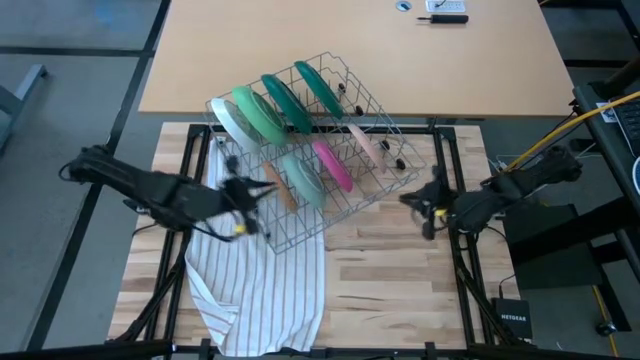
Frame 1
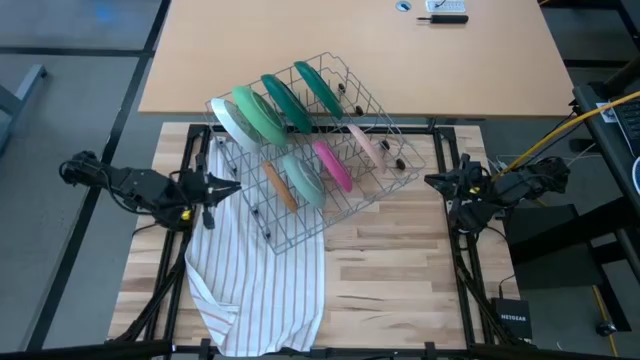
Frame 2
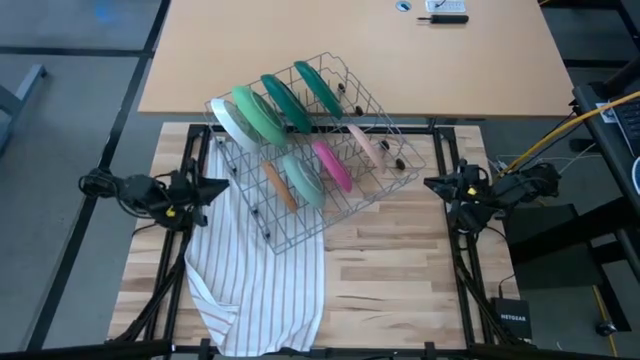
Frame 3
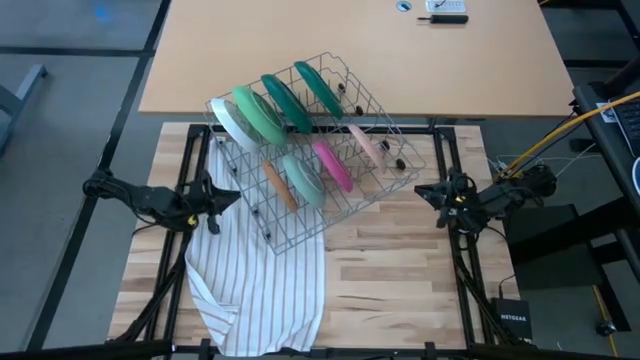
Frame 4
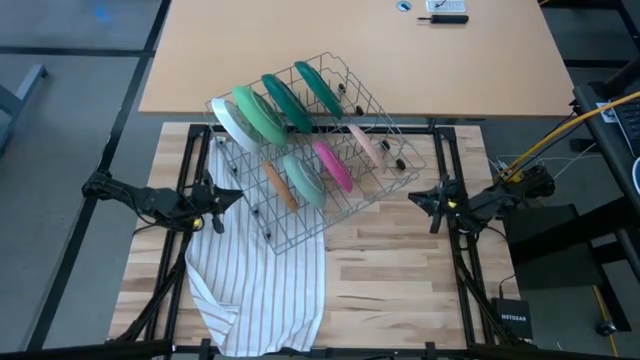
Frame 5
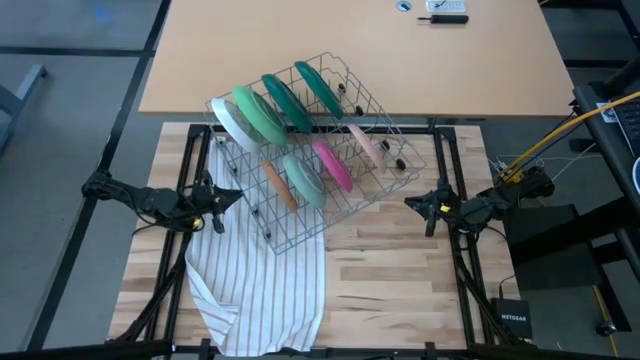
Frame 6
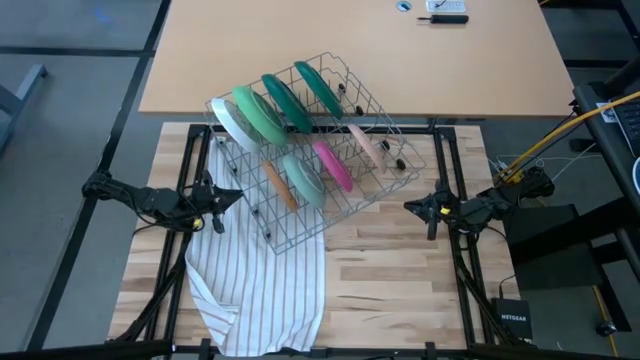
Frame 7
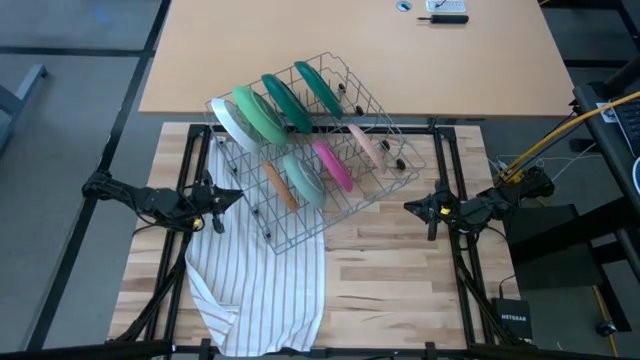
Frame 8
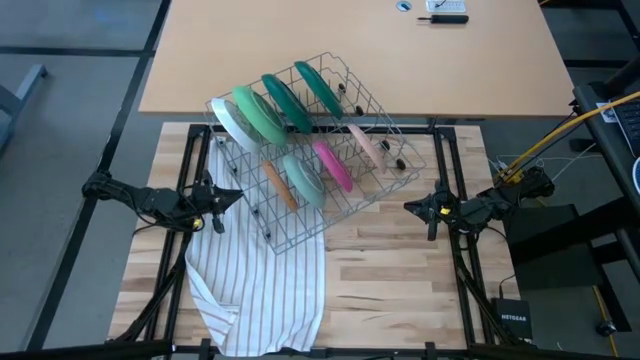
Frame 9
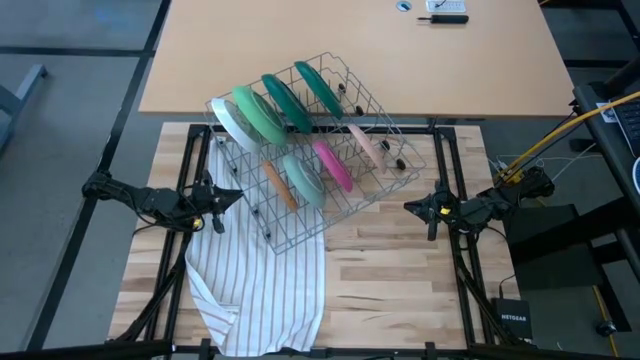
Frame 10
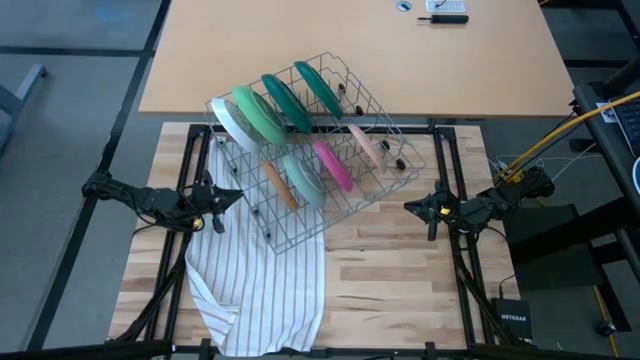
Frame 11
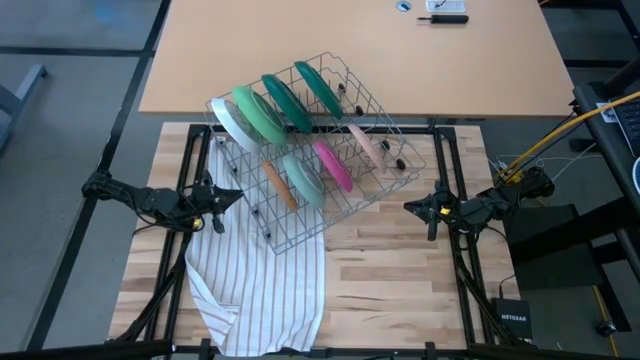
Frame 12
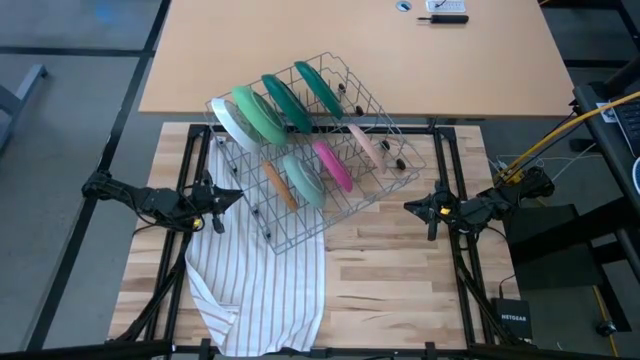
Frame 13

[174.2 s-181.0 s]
Task: Sort dishes
Return to Home Position

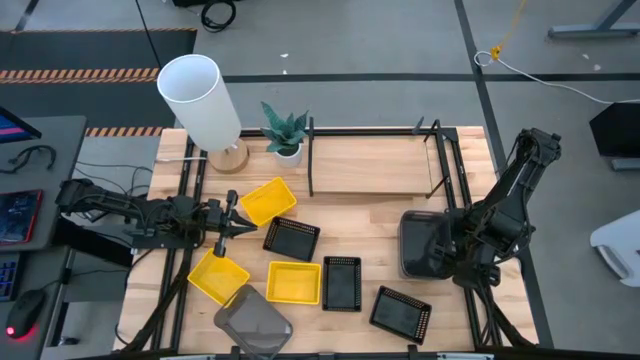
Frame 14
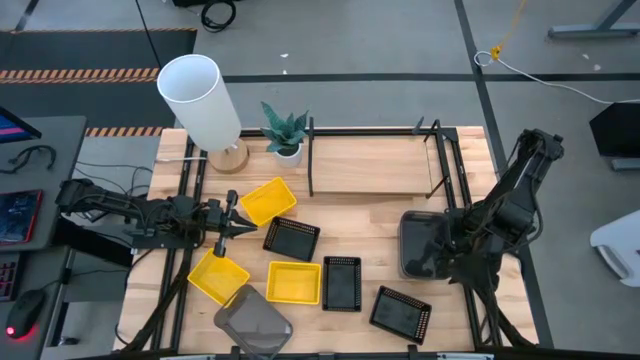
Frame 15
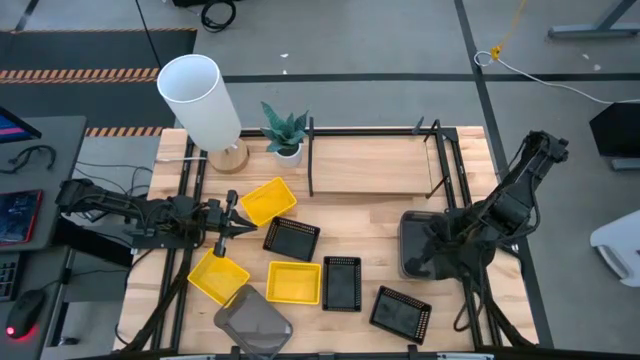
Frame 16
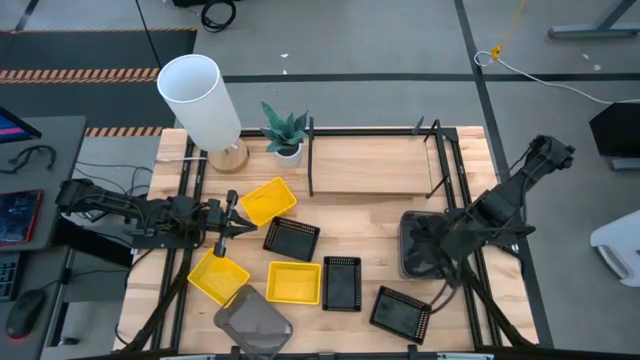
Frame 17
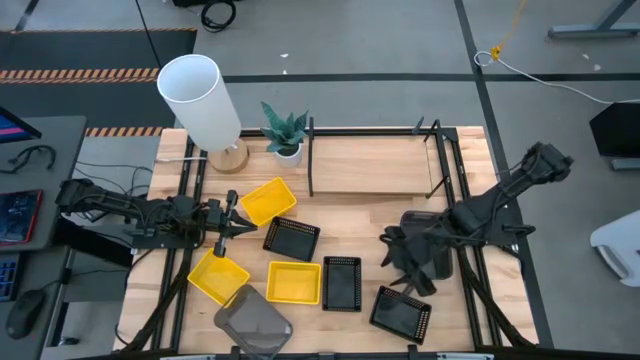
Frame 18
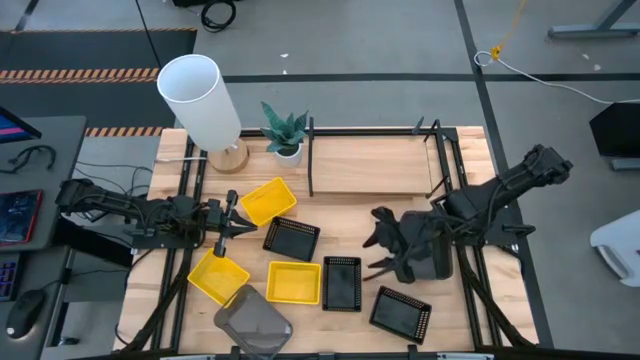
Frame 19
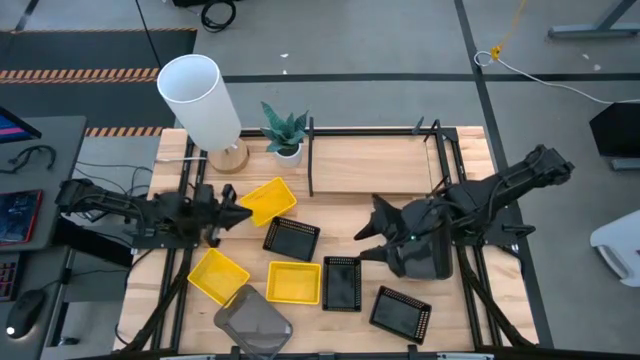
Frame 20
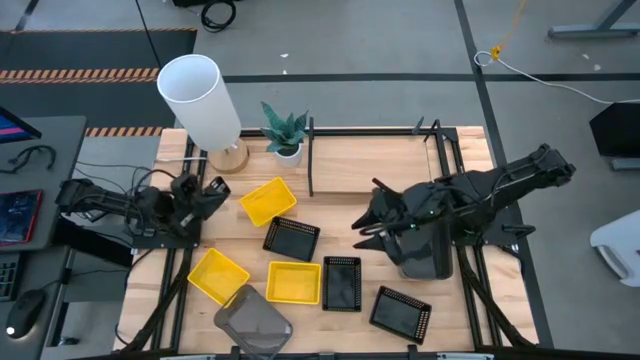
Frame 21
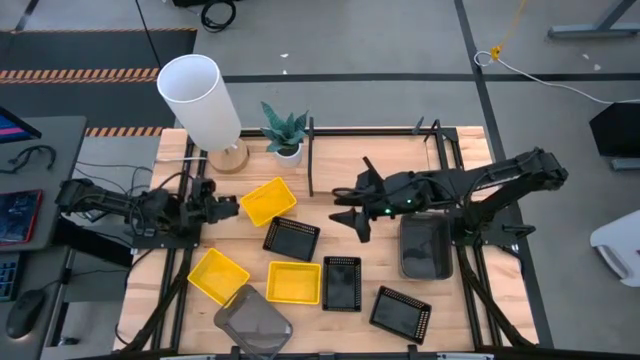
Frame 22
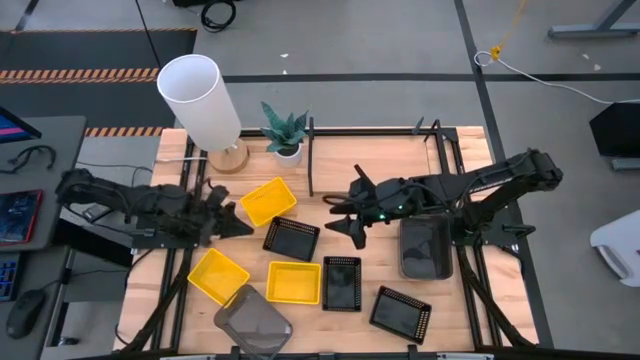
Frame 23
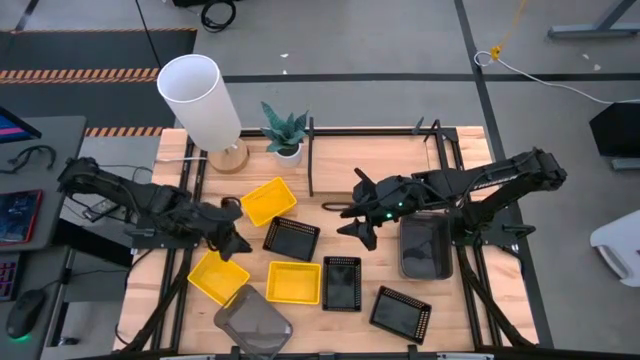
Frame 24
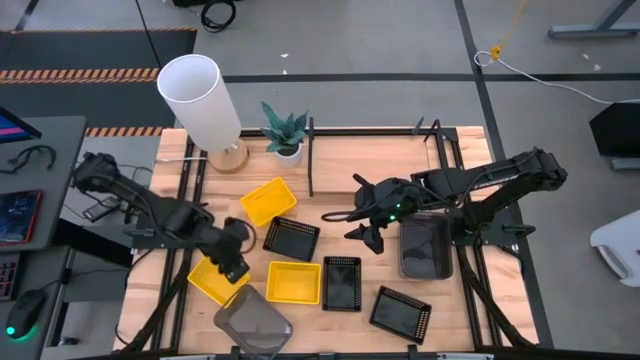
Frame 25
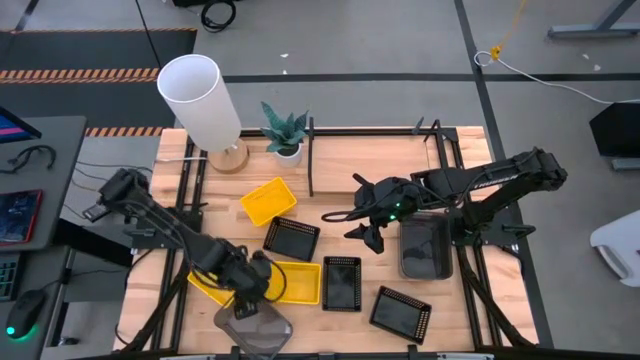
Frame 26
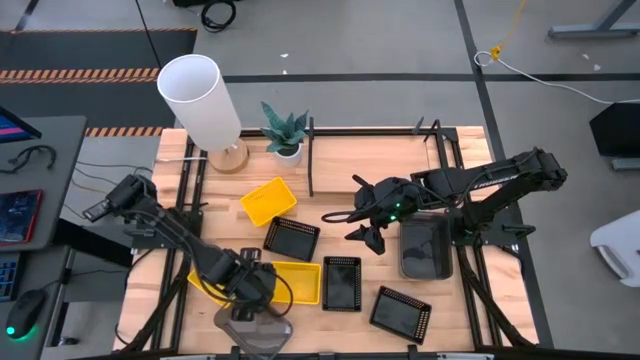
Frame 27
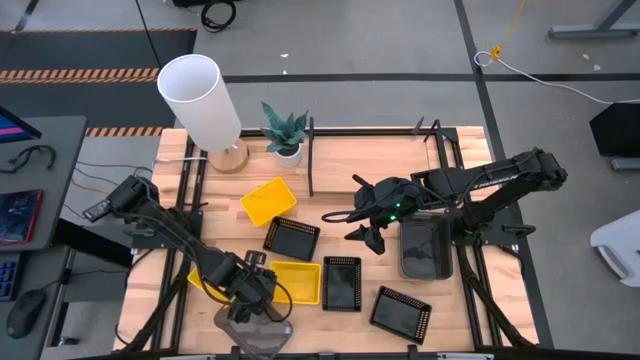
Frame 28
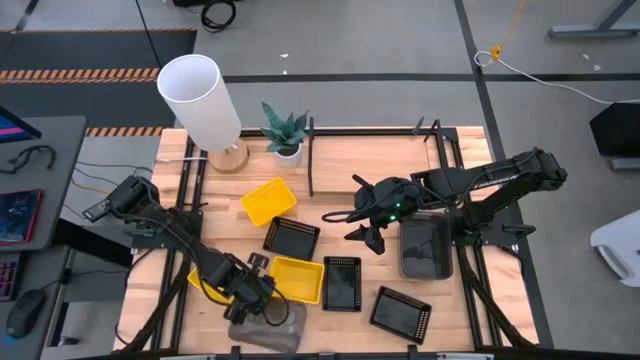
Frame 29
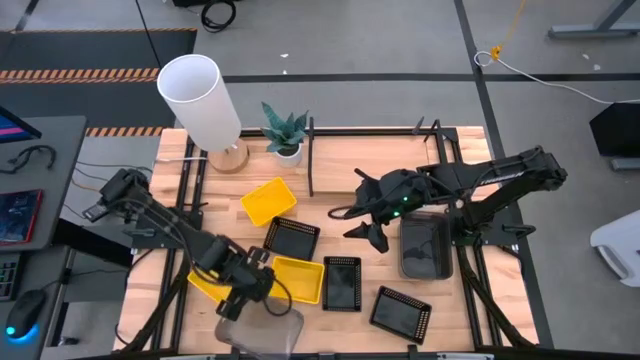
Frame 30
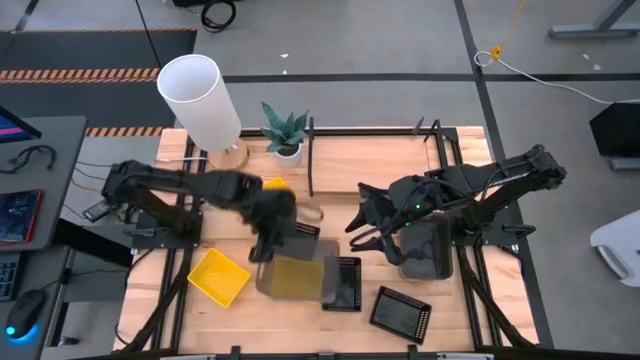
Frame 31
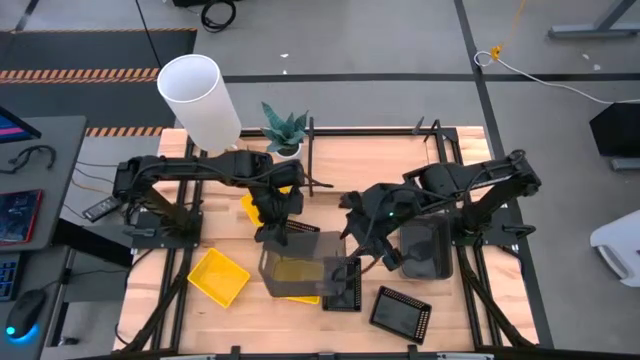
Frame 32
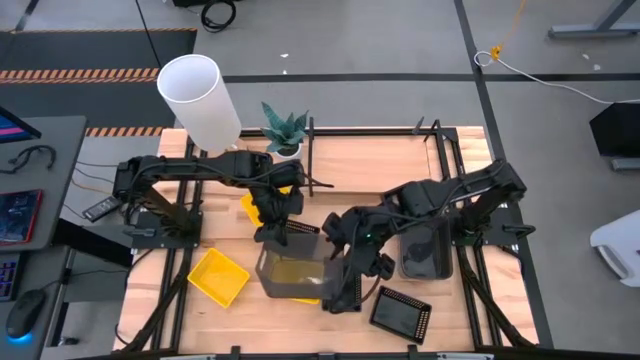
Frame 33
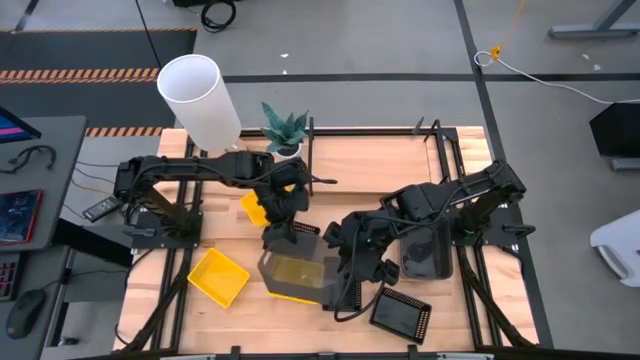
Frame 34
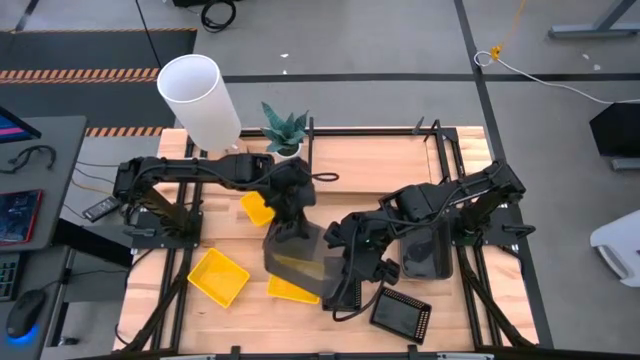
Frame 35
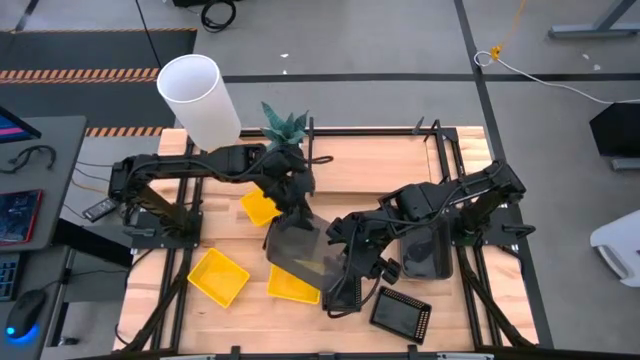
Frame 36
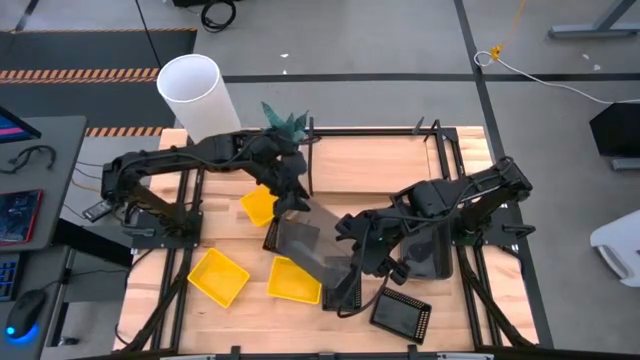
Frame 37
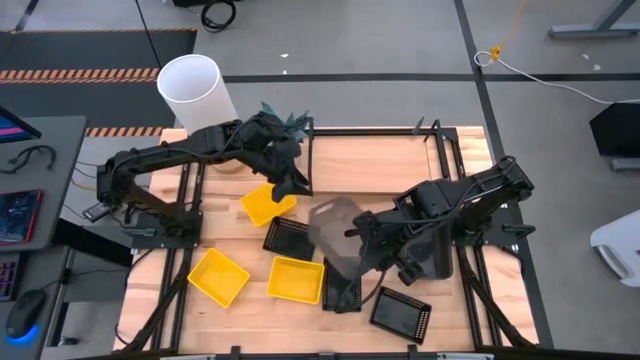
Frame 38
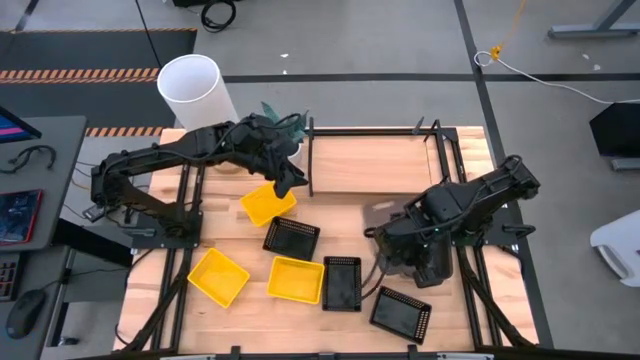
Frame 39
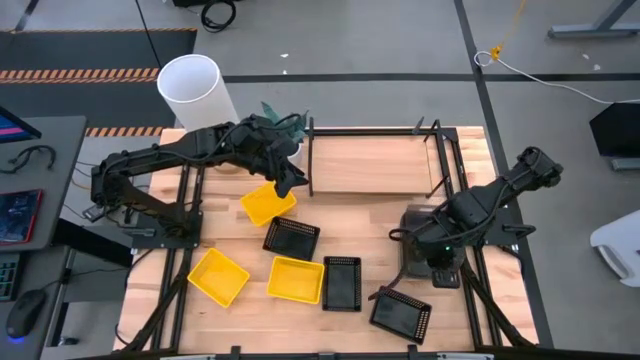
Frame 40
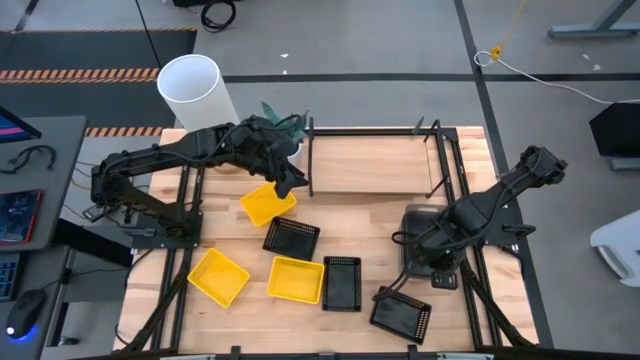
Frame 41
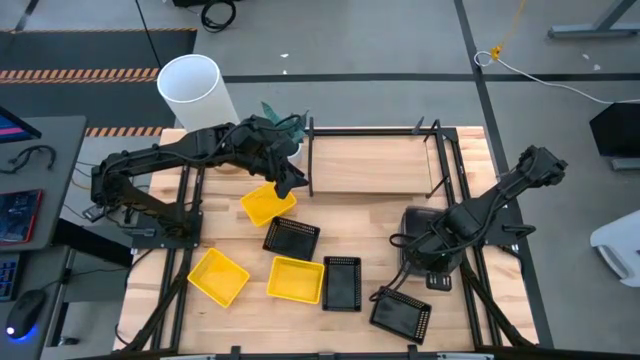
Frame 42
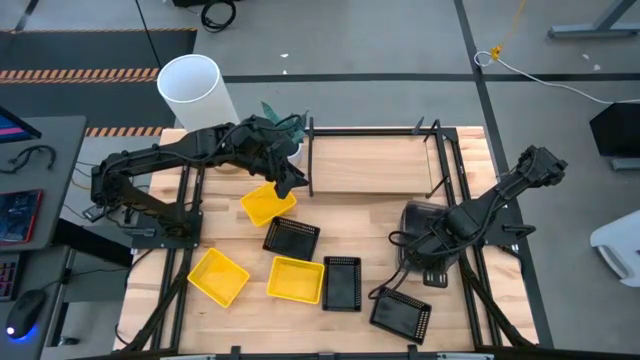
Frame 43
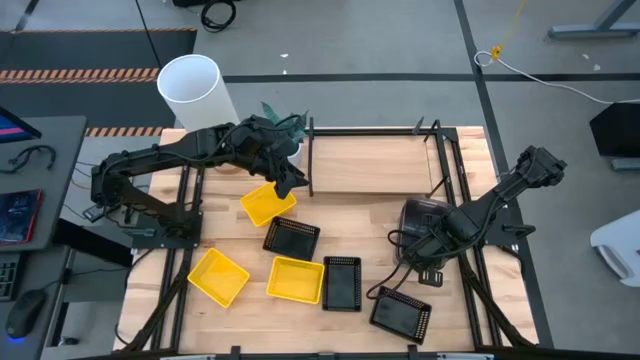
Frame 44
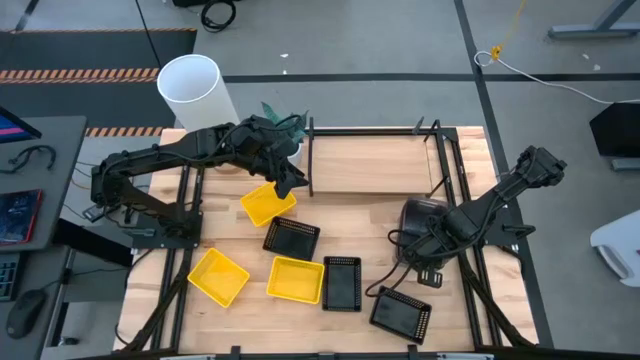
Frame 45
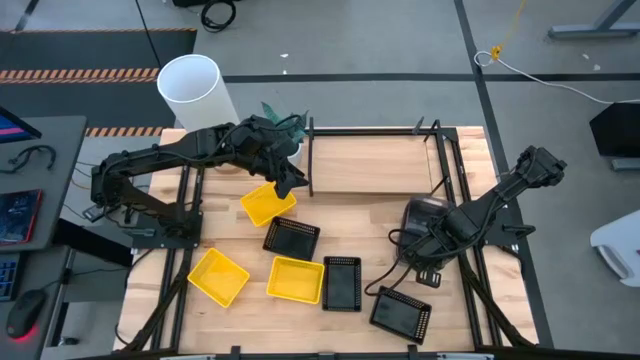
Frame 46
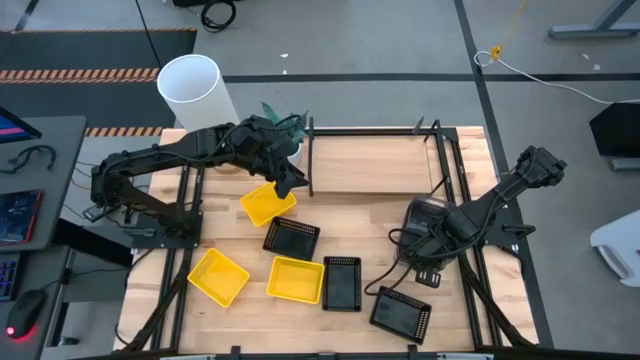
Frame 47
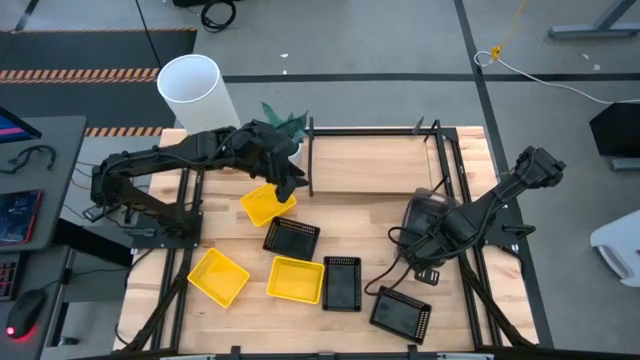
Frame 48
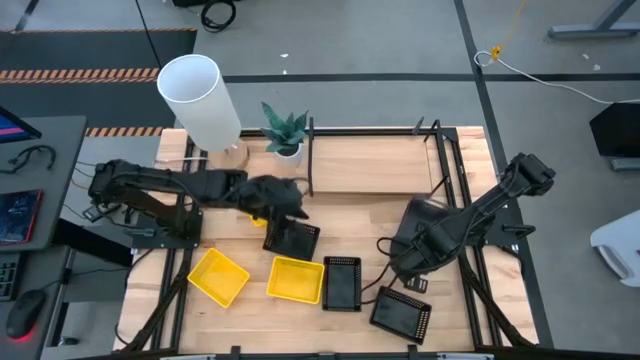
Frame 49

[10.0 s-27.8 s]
Task: Stack baskets on shelf by color
Stack the left black bin on top of the right black bin
